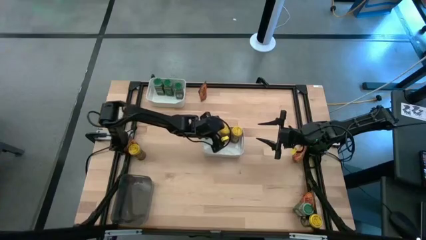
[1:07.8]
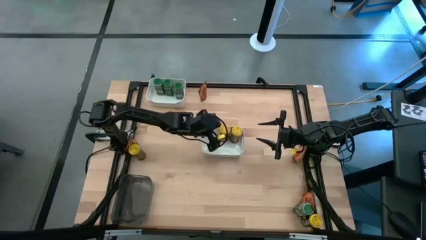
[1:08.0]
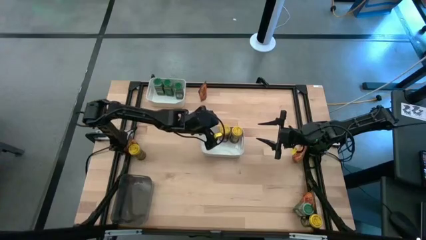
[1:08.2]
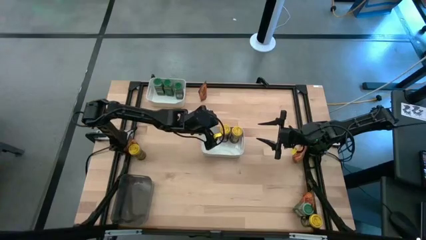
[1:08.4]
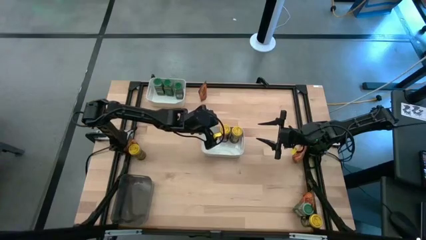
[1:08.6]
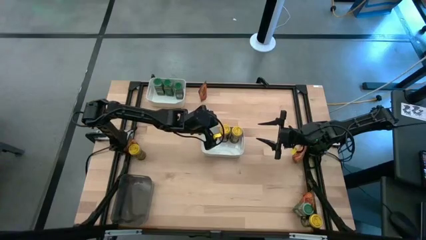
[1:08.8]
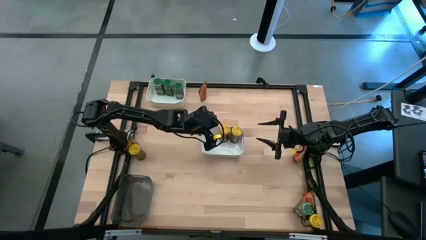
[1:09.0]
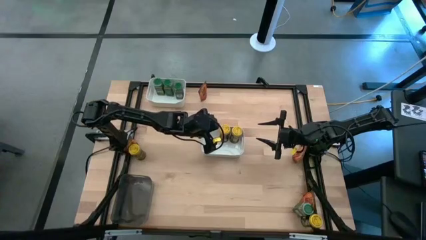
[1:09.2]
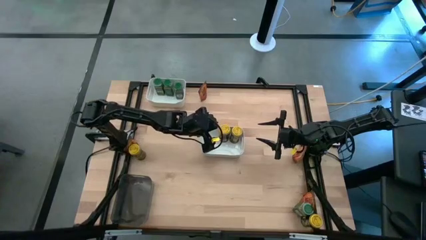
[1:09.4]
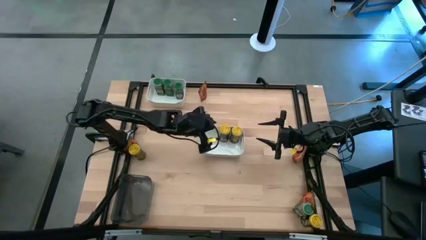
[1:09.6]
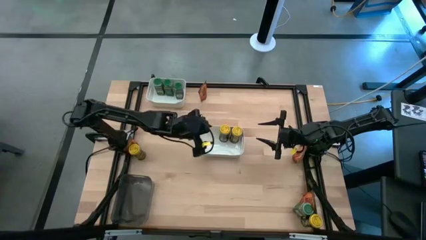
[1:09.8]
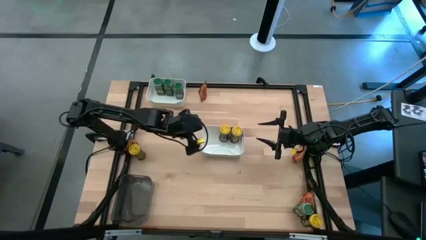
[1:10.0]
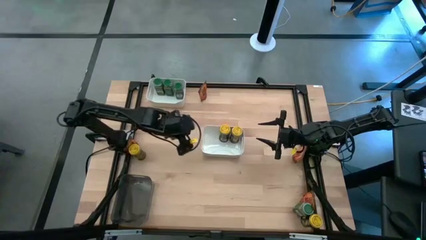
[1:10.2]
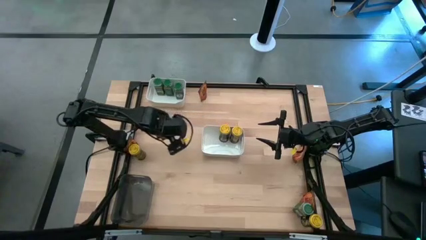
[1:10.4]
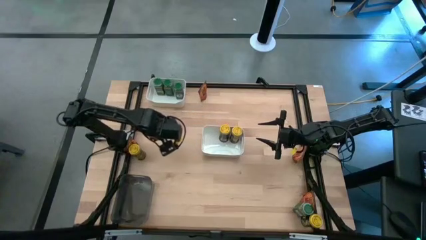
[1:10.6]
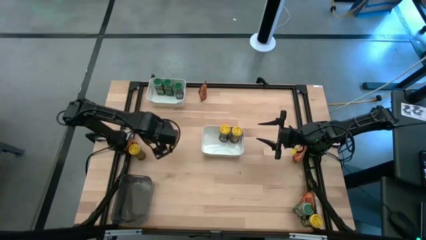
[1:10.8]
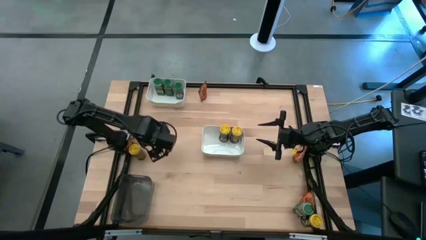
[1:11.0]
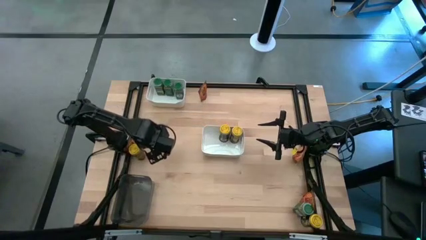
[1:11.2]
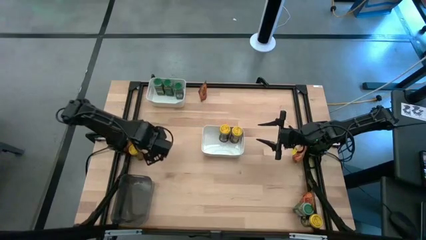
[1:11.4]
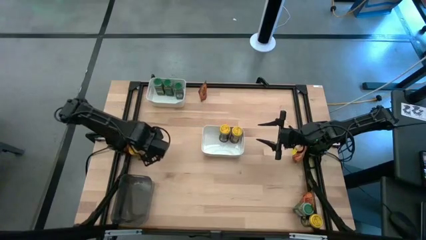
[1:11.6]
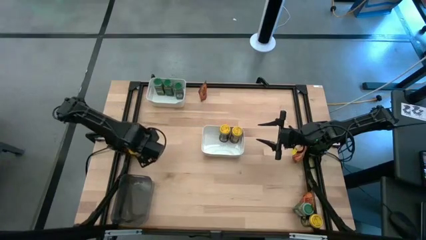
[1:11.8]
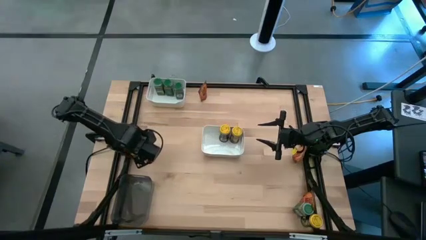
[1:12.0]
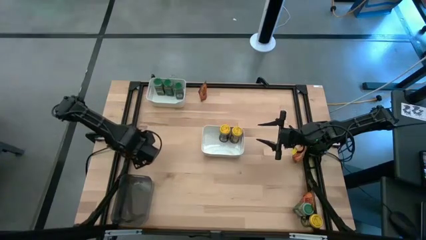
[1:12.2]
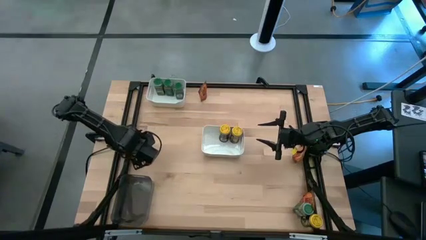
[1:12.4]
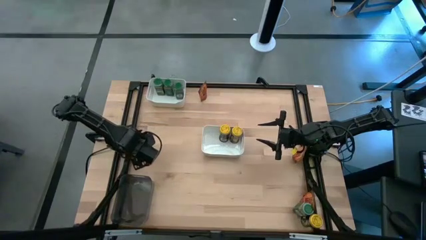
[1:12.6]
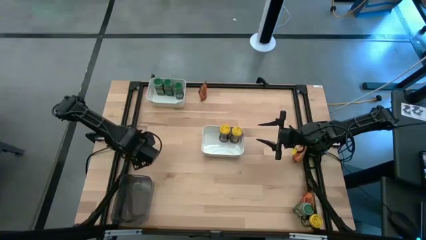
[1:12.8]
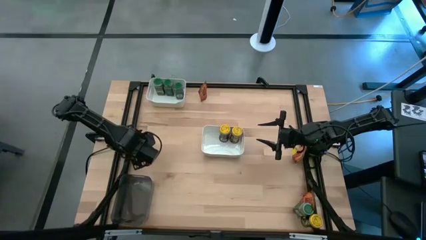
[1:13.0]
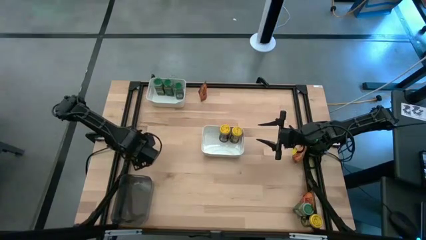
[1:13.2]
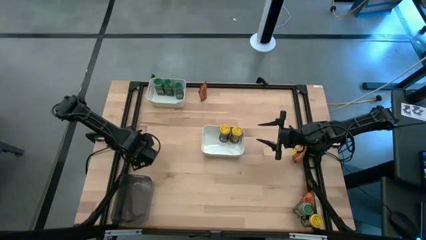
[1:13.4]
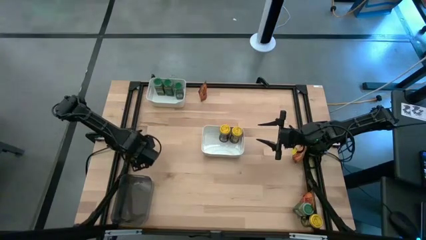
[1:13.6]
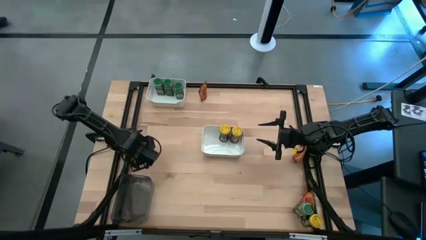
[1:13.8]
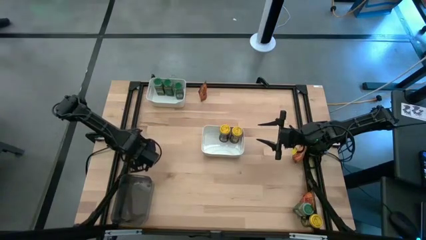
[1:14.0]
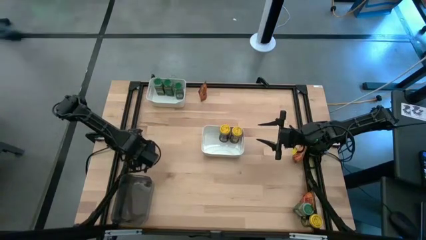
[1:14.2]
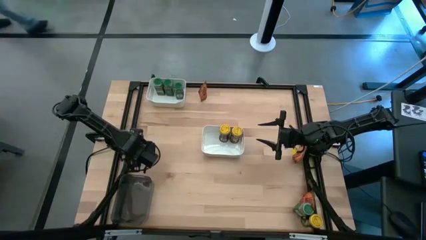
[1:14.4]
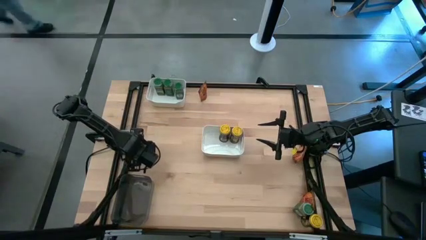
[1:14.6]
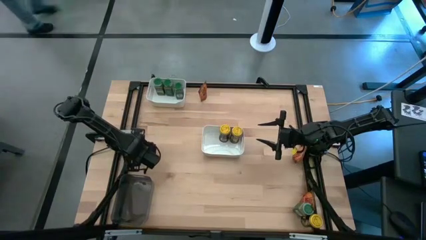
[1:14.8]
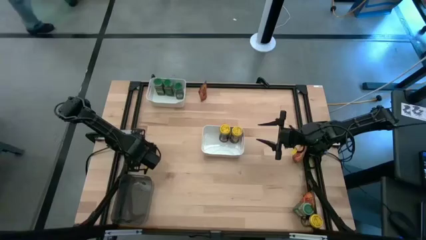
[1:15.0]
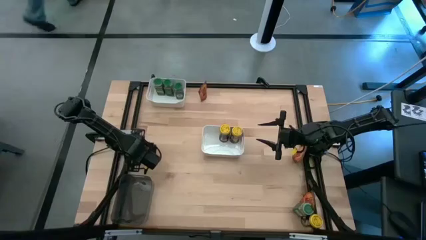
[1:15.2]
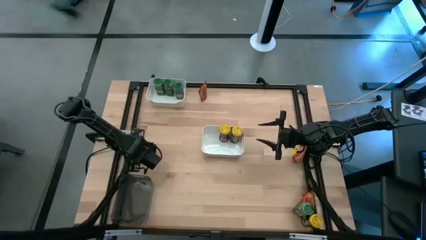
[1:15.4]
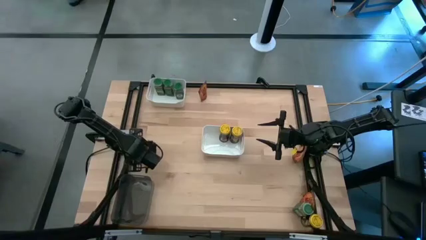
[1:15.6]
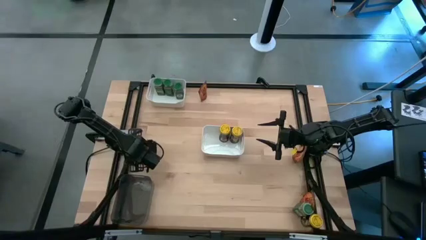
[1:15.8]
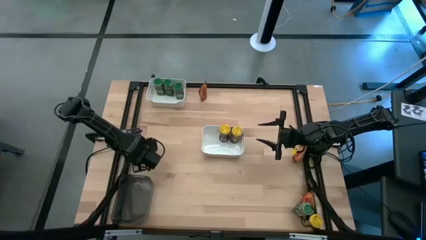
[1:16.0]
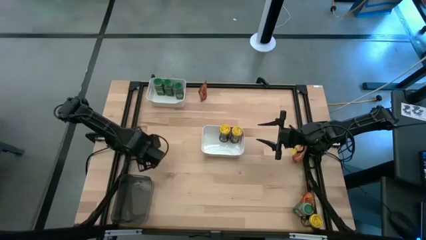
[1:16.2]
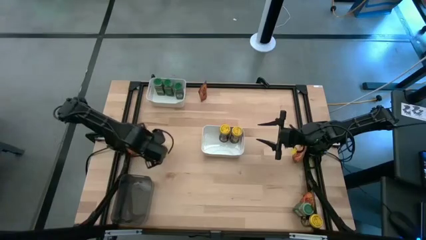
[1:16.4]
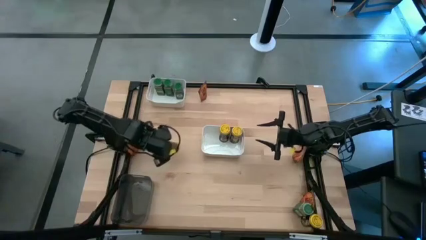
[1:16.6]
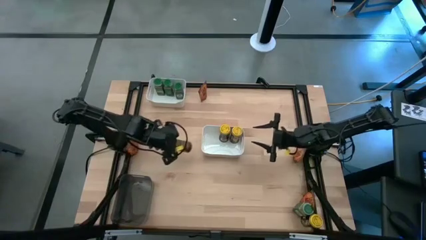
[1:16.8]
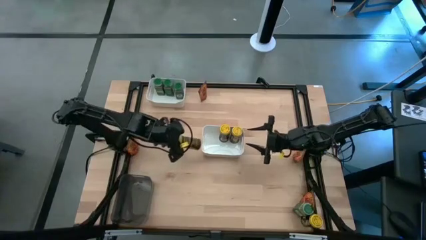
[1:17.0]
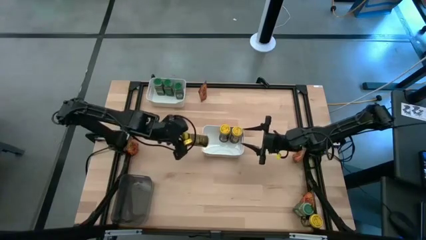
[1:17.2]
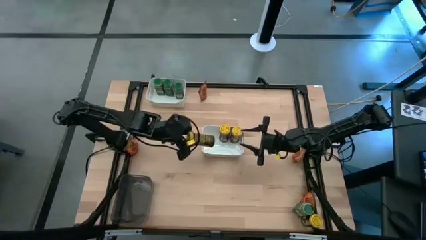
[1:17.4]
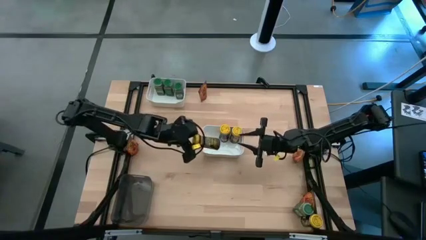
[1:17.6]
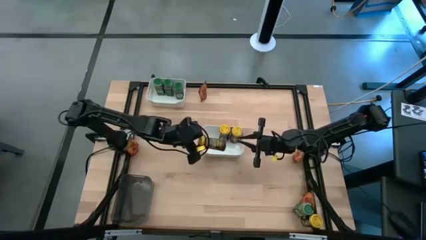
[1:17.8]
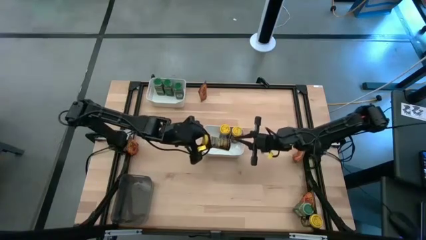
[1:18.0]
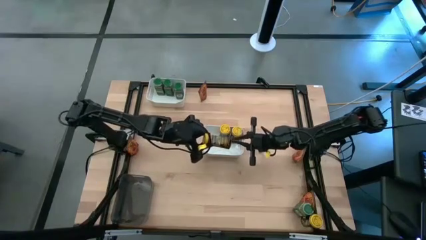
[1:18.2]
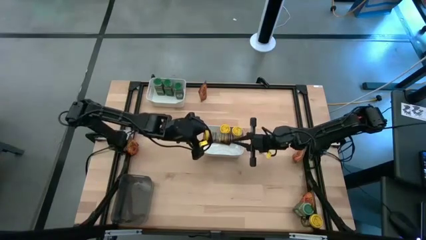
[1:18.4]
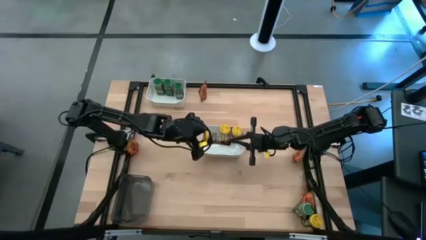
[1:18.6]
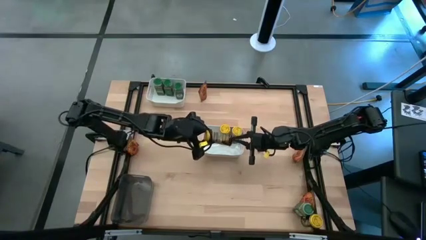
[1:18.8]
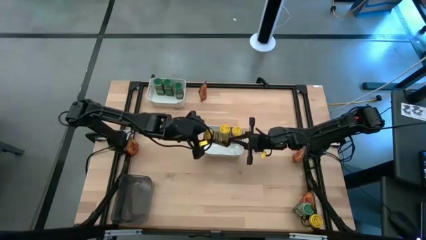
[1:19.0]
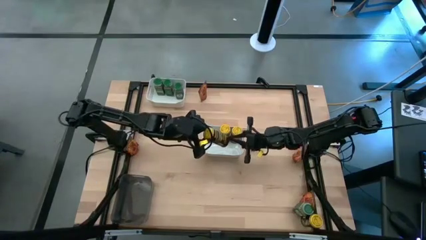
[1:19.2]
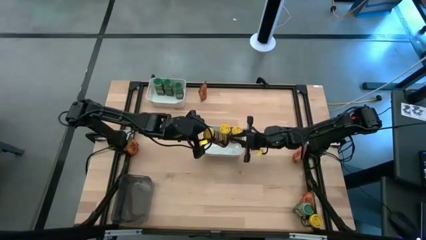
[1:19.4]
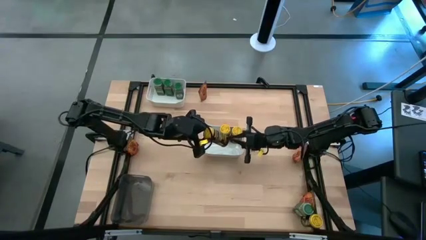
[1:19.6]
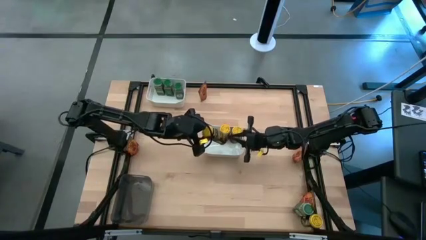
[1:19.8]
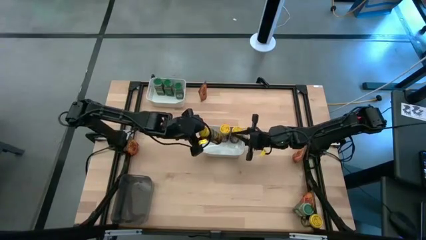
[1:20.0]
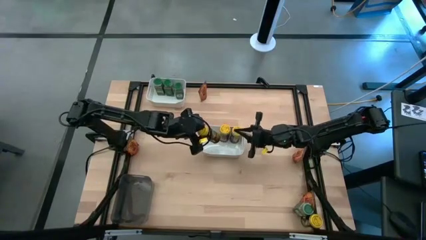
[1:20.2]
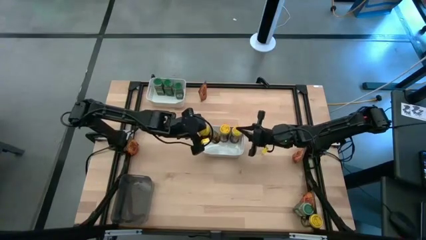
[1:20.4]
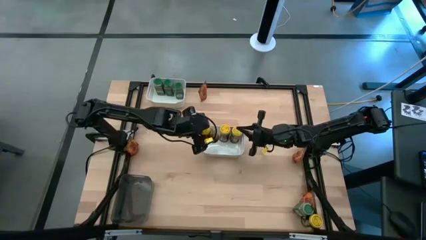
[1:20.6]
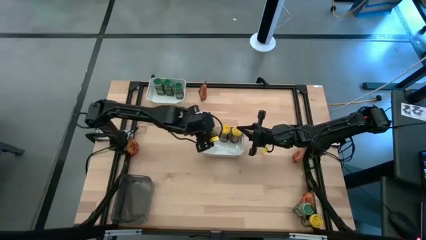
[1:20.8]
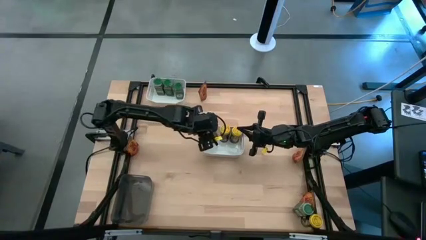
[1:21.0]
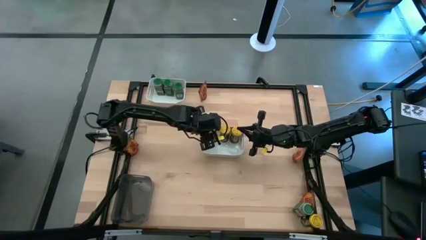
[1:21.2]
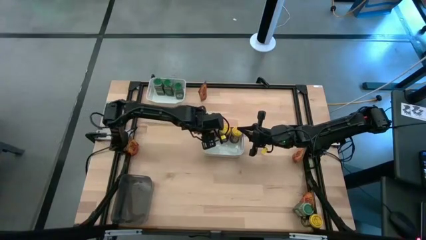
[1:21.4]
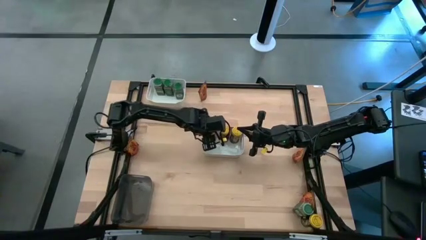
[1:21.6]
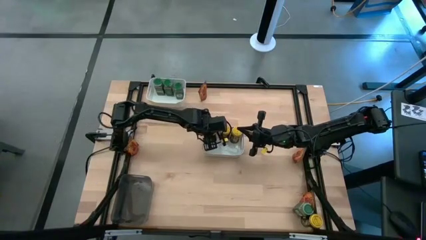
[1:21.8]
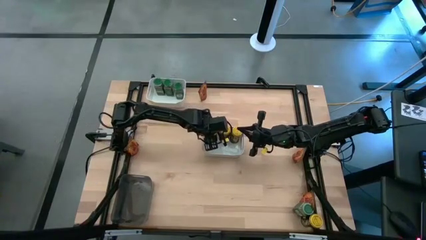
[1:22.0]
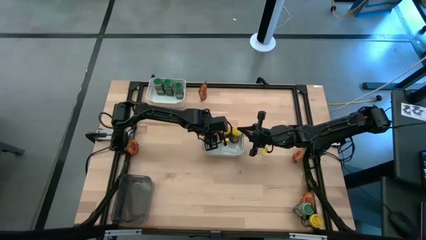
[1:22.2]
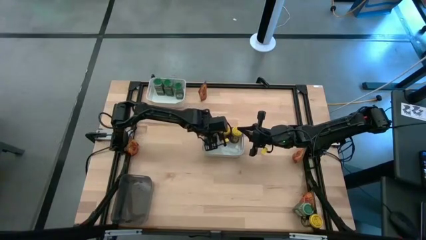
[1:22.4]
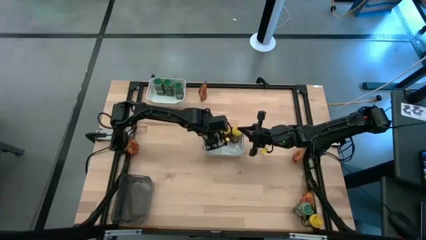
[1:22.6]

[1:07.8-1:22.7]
Task: Sort spices by type
Put the yellow seasoning bottle into the bottom white bin
